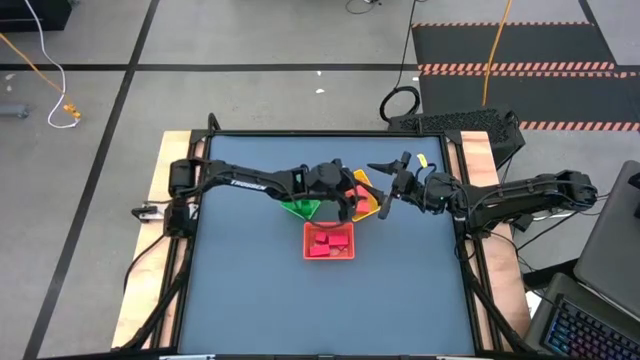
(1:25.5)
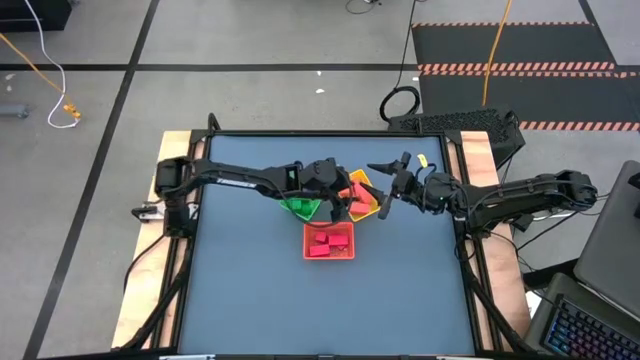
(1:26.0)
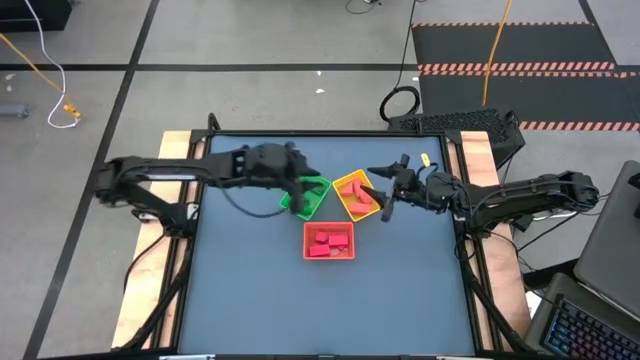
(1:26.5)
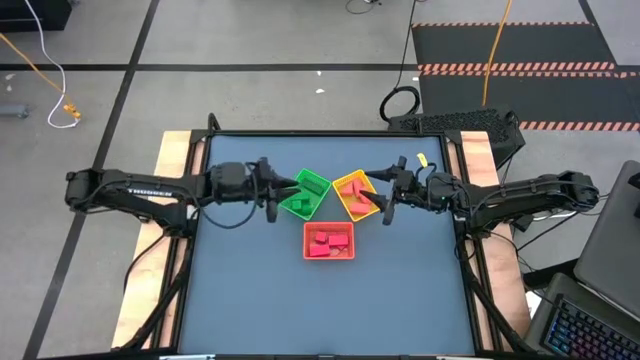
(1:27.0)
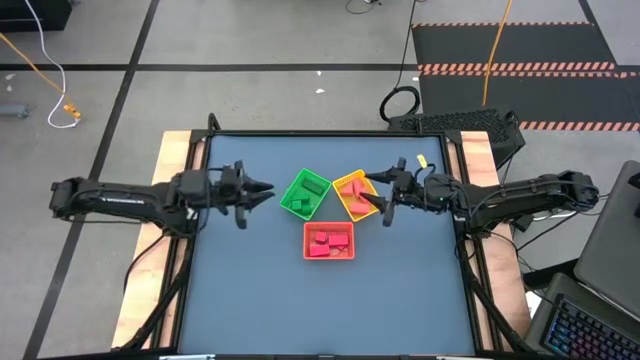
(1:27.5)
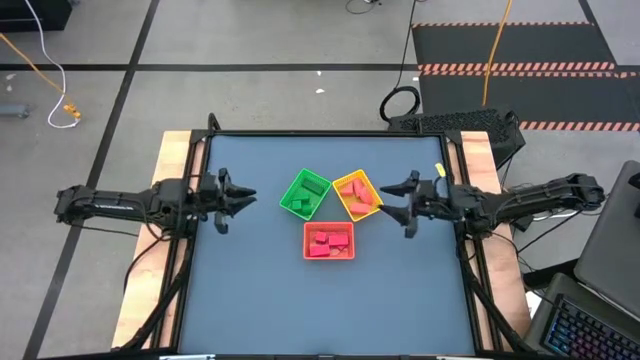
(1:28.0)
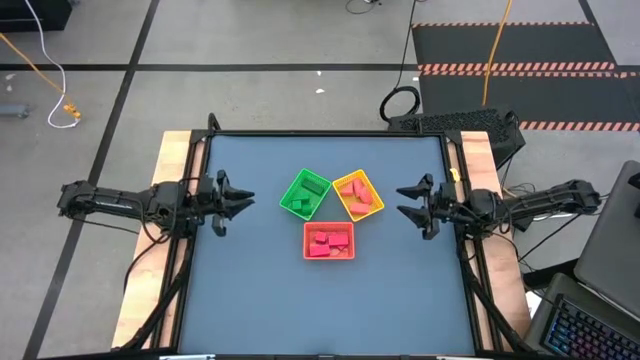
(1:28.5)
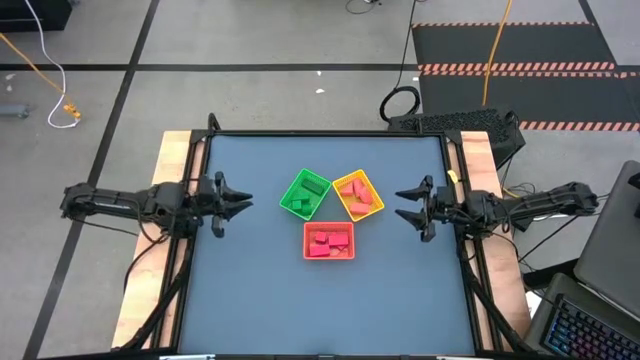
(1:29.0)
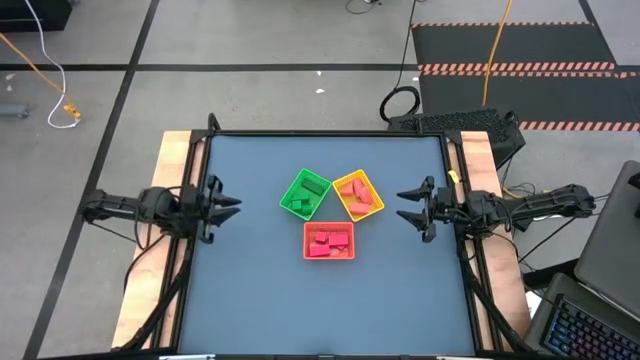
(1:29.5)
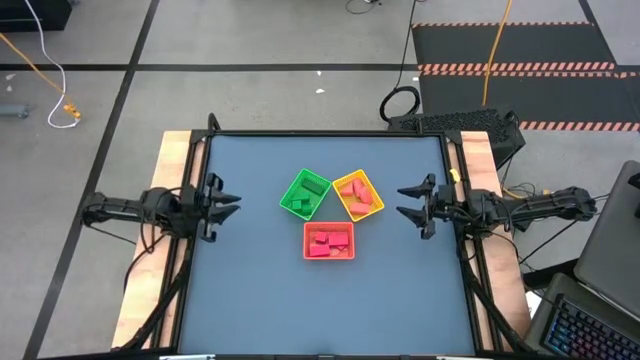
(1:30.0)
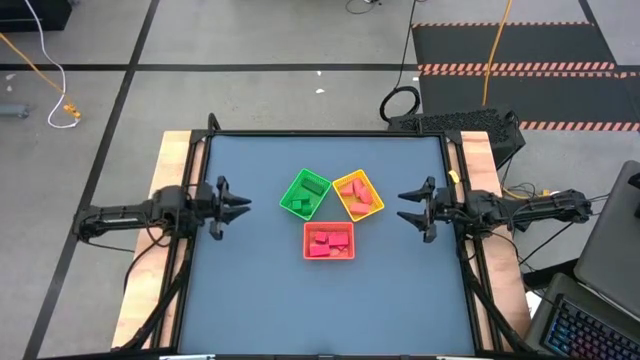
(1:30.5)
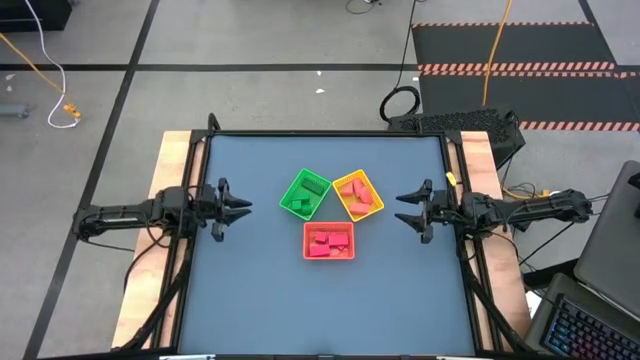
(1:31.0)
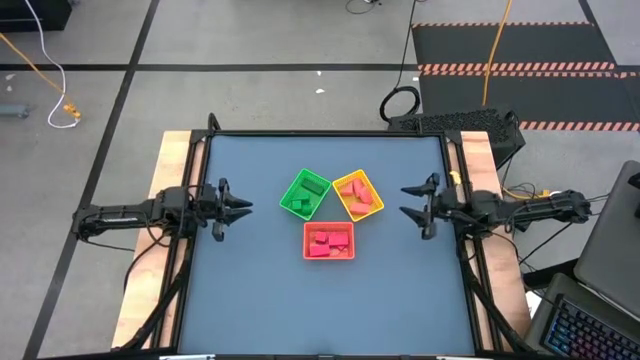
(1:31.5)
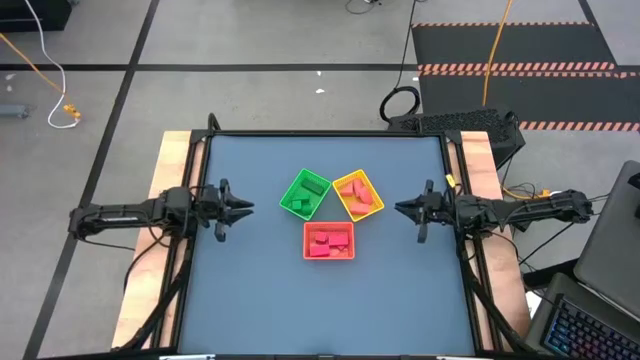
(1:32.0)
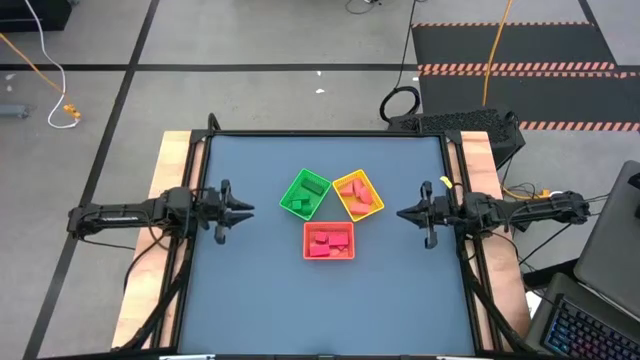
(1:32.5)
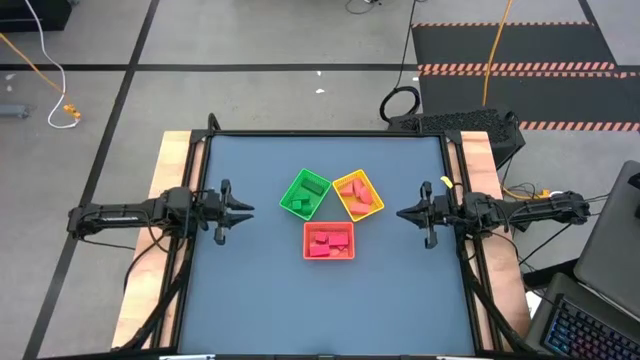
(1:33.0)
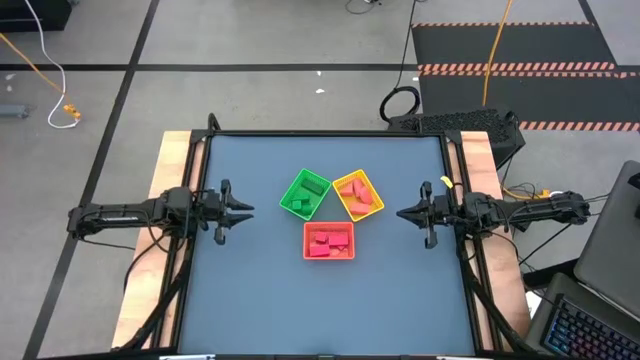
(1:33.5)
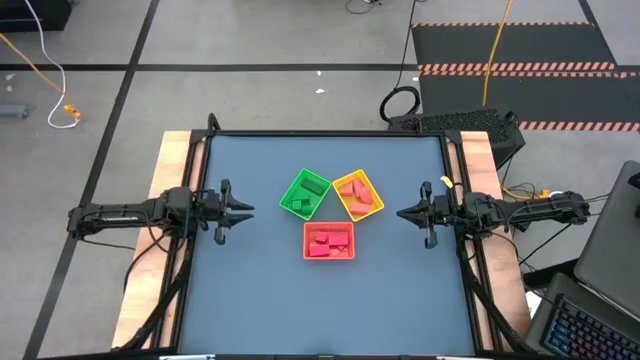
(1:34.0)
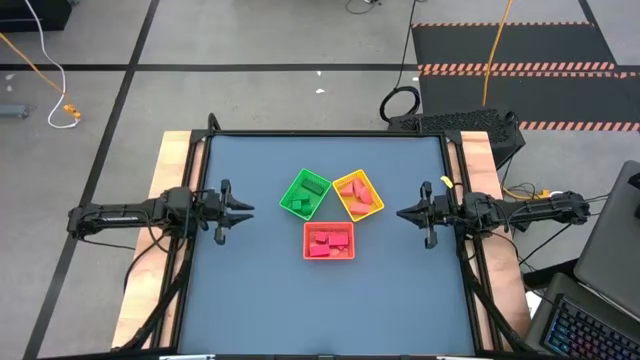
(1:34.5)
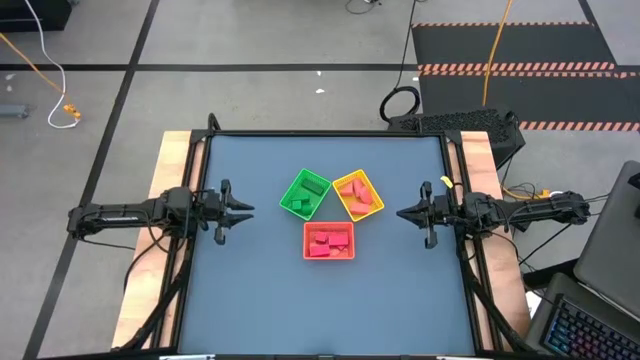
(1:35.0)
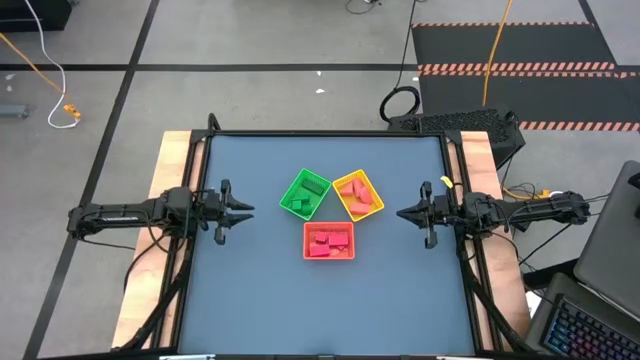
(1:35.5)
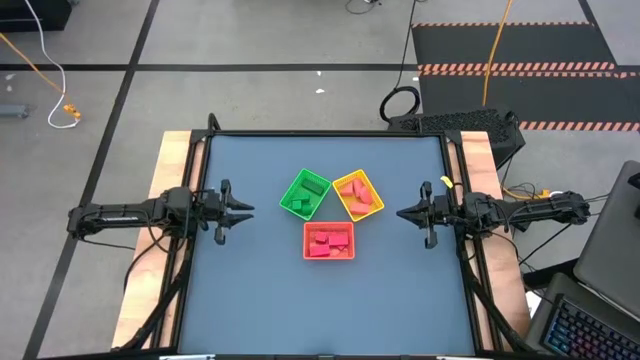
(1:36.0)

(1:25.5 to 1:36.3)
Task: Sort & place blocks by color
Return to Home Position

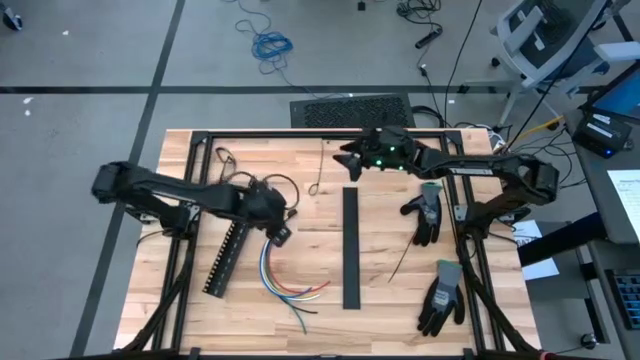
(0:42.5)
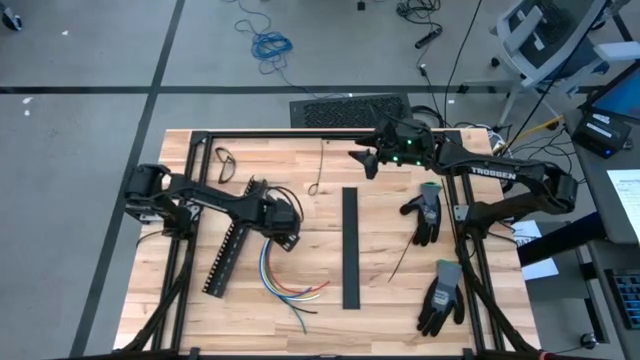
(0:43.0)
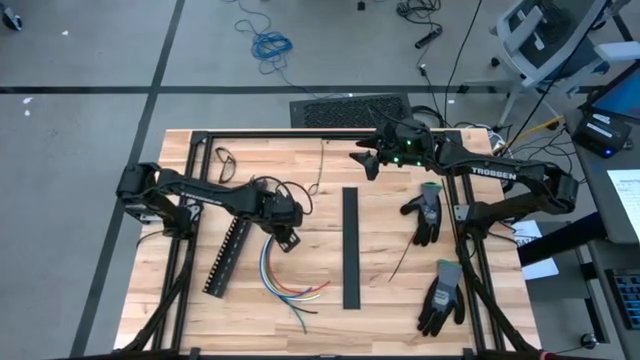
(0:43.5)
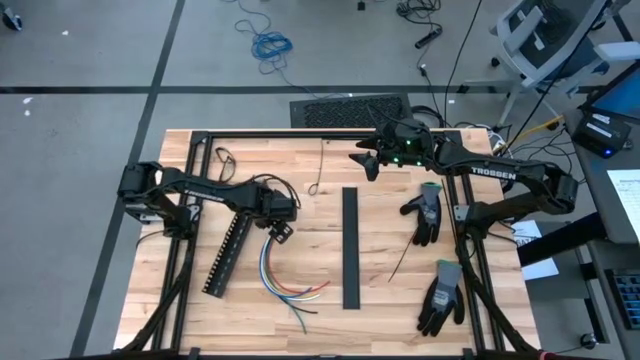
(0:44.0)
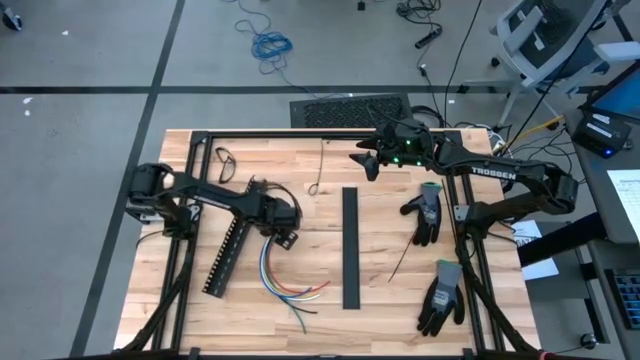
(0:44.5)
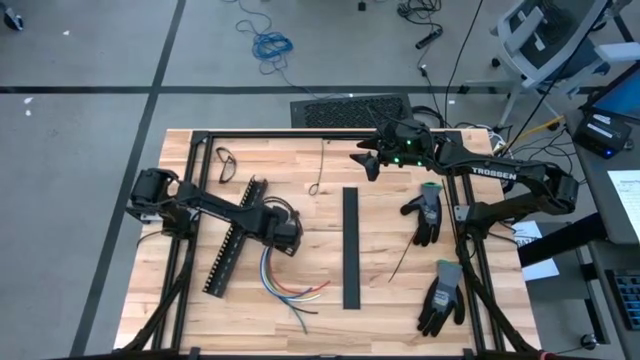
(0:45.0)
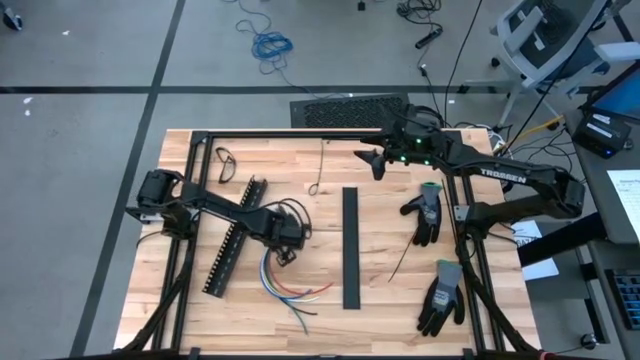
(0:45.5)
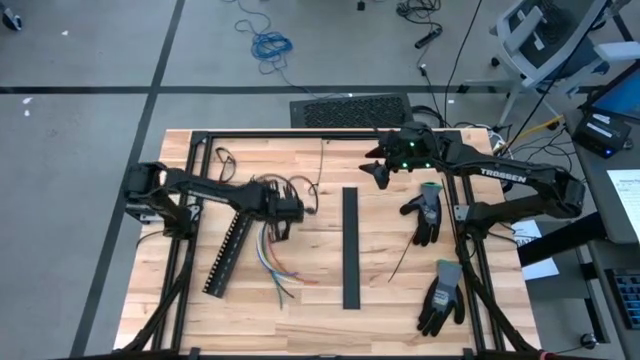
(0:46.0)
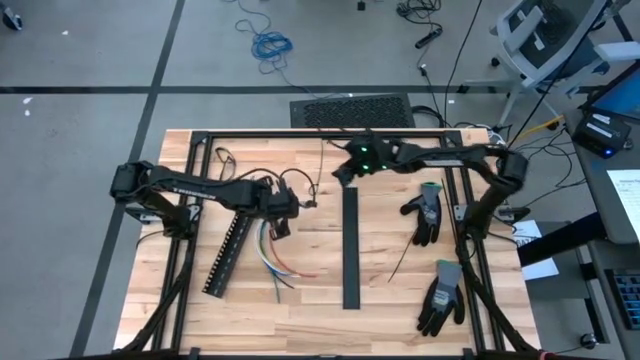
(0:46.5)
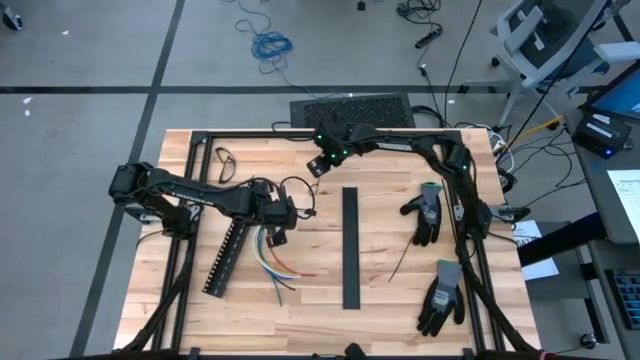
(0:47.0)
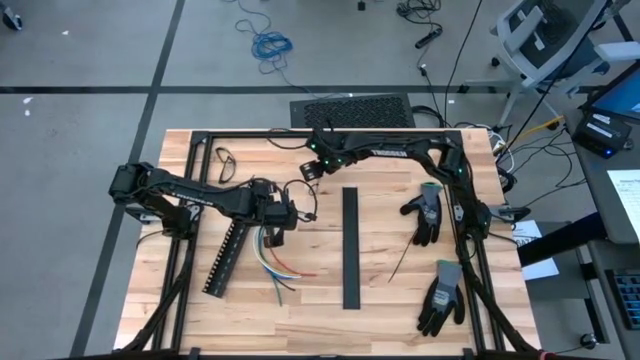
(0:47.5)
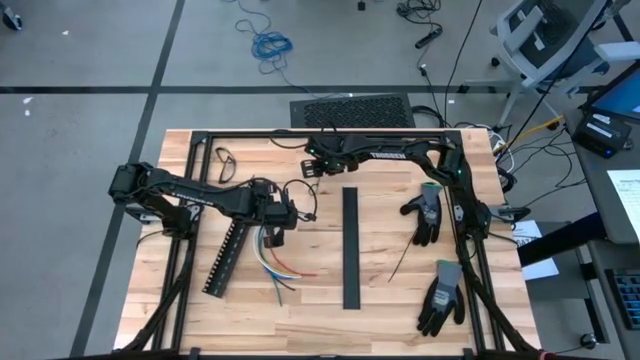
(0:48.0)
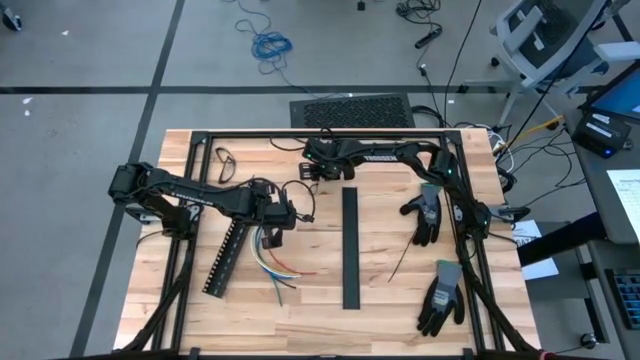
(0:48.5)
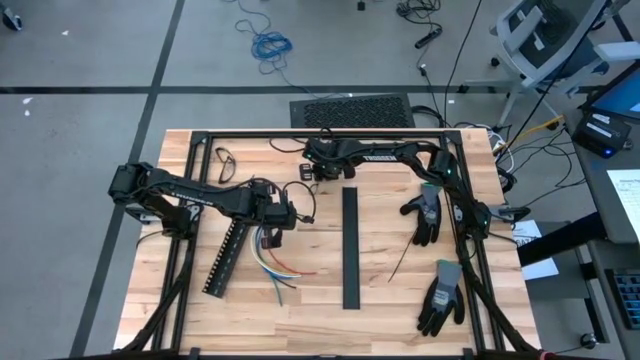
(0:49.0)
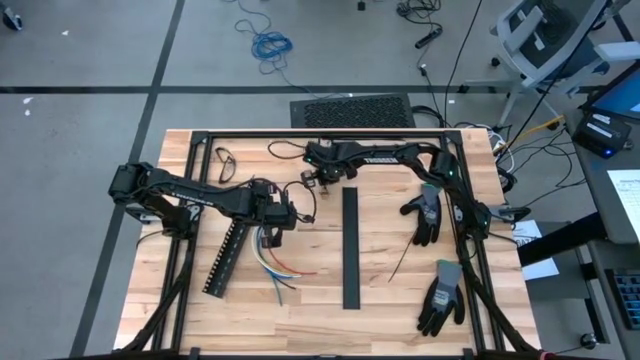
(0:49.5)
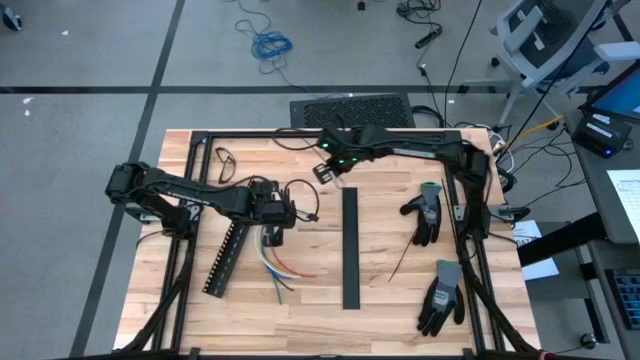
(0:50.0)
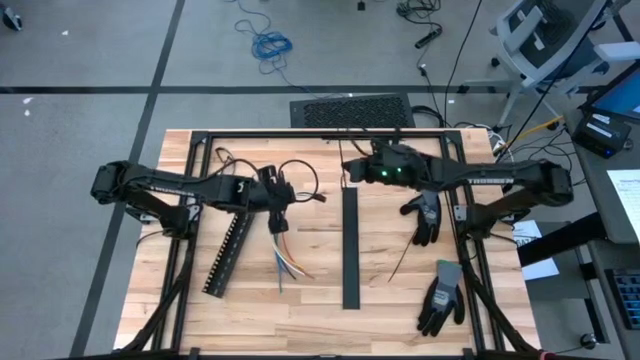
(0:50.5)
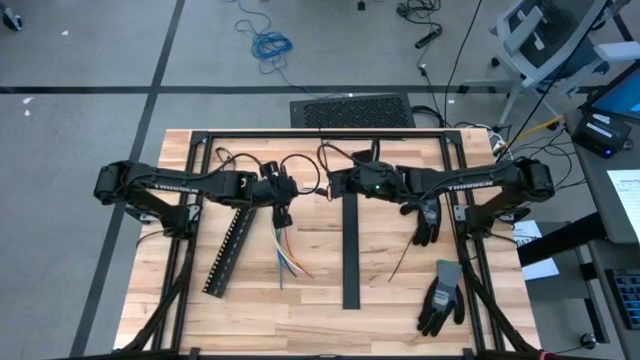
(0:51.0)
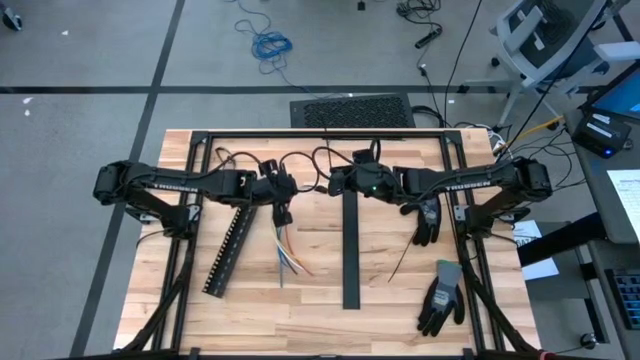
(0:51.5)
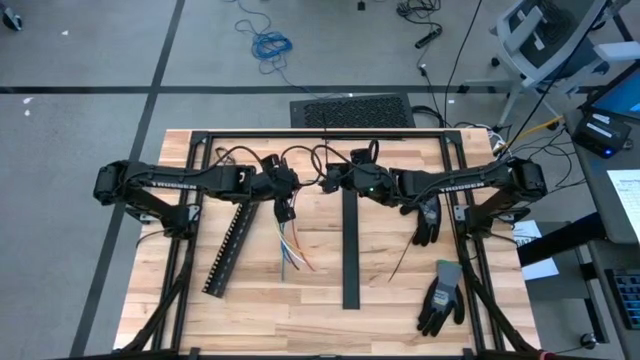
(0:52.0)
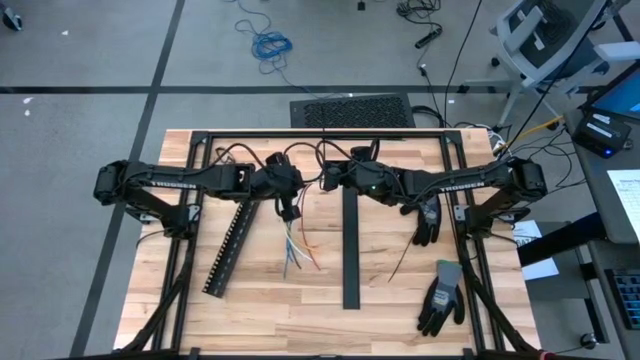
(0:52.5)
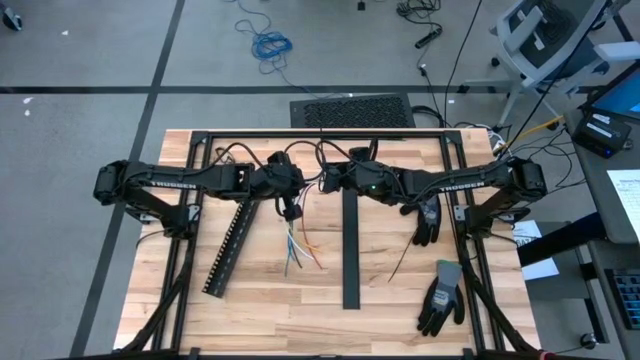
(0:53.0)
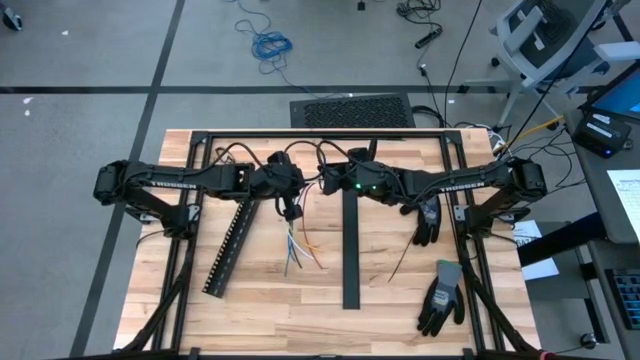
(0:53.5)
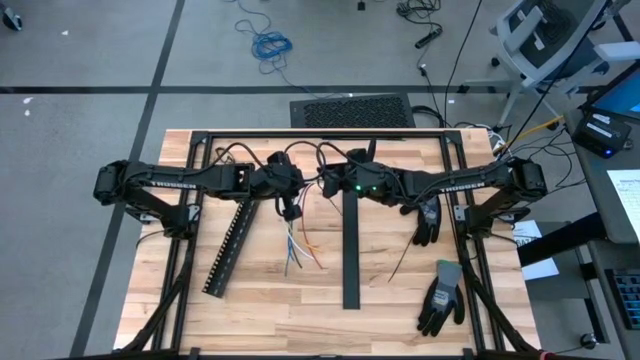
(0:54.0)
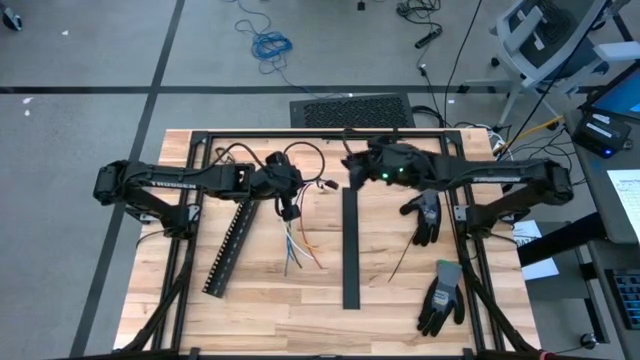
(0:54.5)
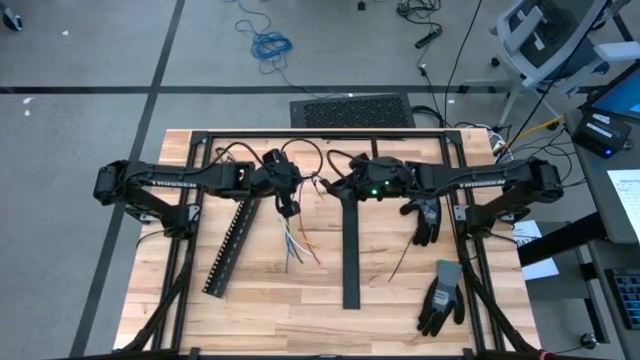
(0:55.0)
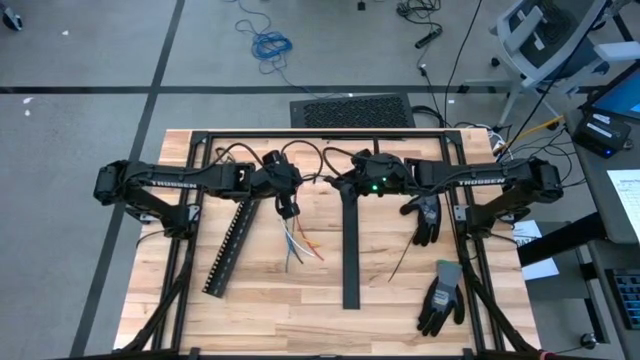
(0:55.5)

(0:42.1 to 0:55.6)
Task: Ziptie cables
Wrap the black zip tie around the cables
